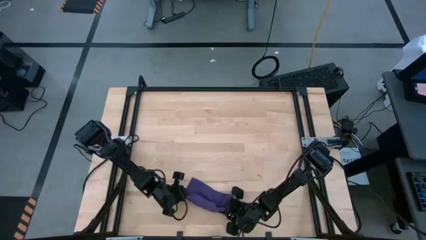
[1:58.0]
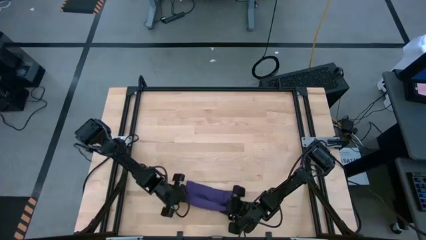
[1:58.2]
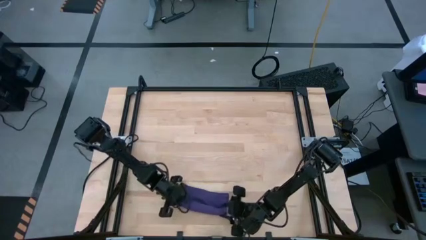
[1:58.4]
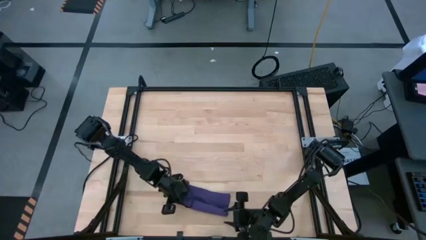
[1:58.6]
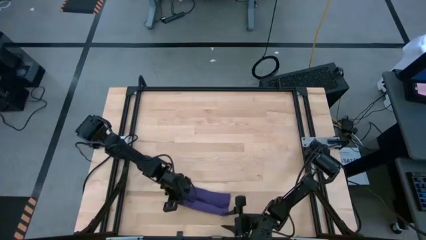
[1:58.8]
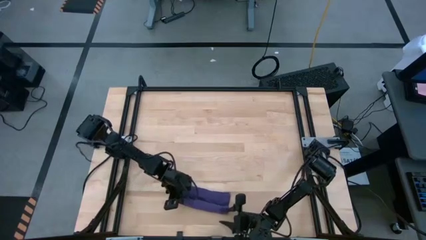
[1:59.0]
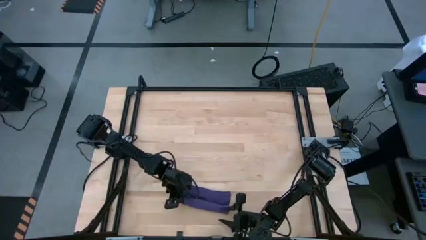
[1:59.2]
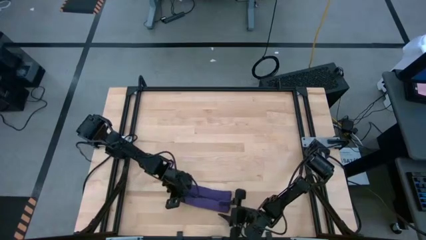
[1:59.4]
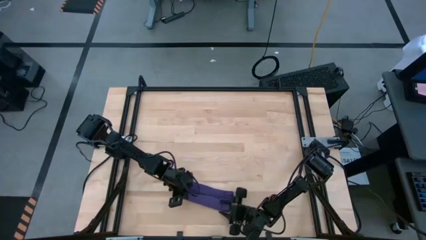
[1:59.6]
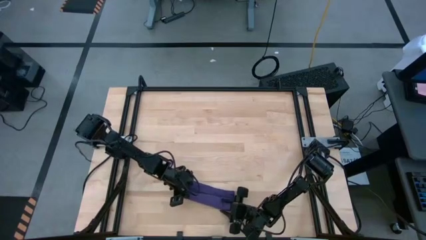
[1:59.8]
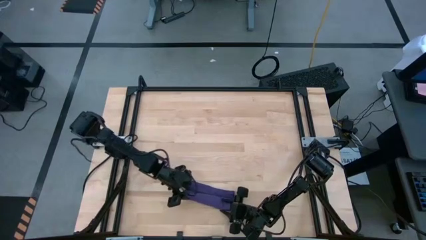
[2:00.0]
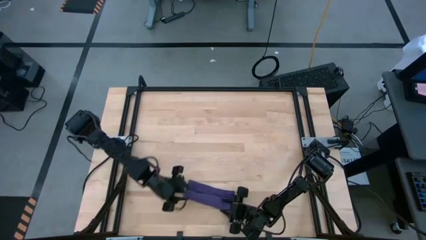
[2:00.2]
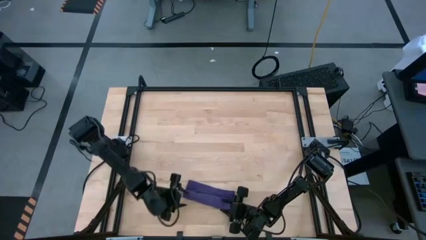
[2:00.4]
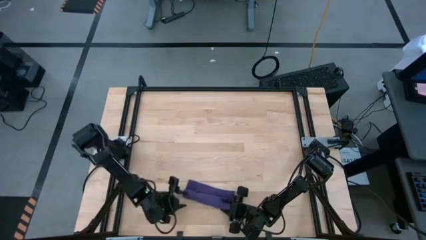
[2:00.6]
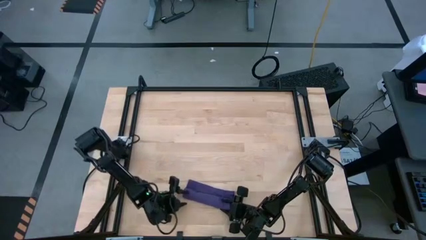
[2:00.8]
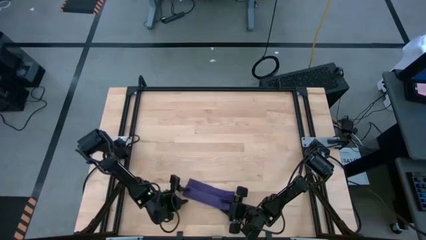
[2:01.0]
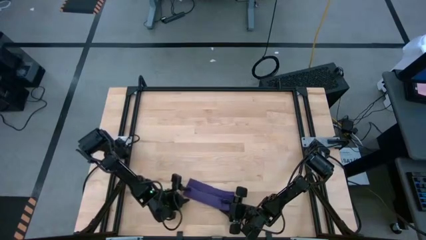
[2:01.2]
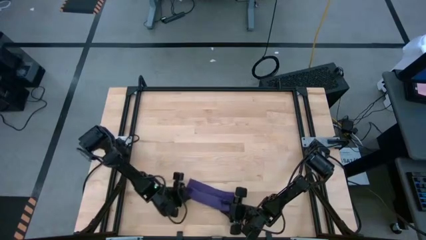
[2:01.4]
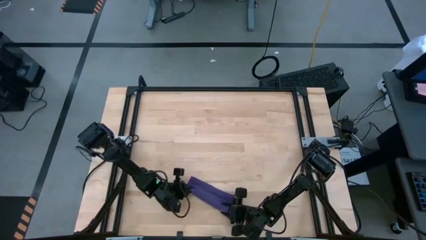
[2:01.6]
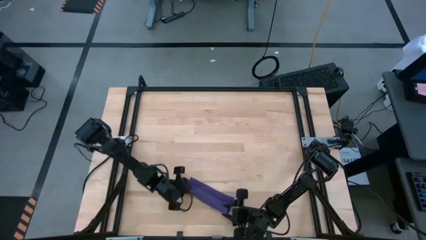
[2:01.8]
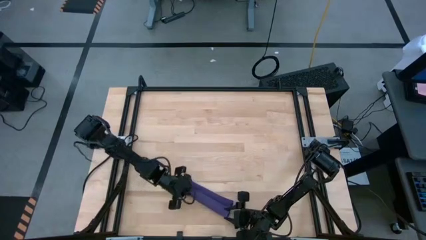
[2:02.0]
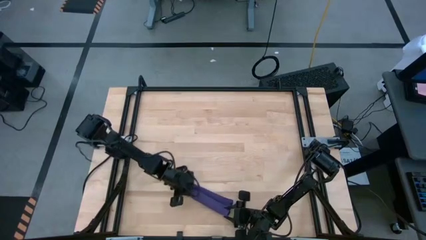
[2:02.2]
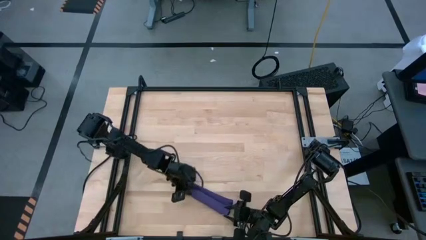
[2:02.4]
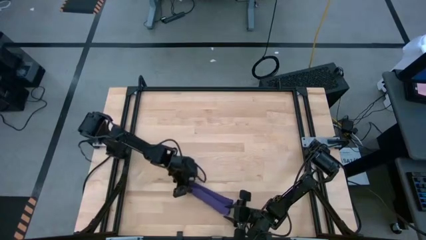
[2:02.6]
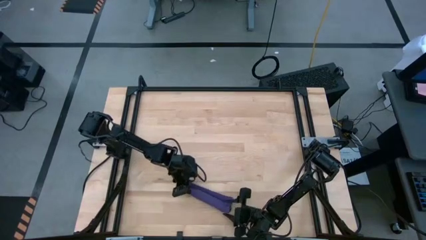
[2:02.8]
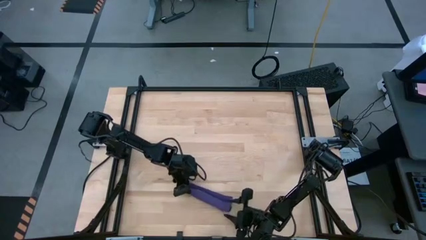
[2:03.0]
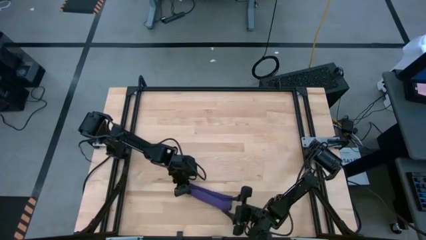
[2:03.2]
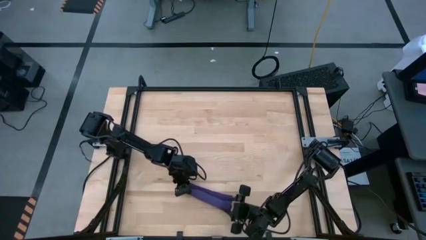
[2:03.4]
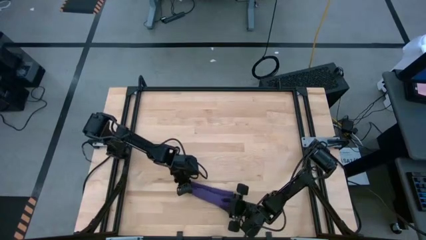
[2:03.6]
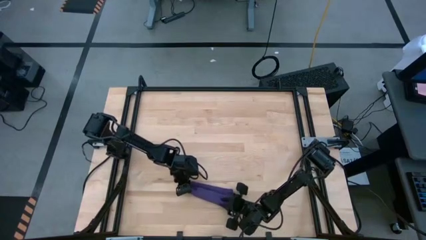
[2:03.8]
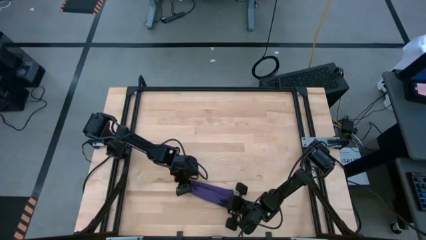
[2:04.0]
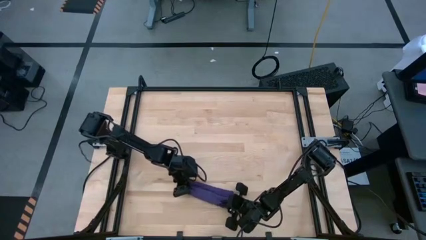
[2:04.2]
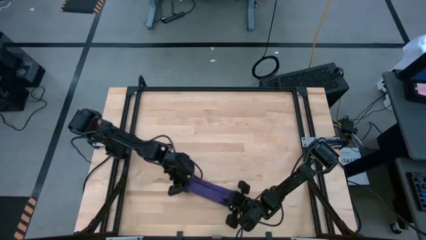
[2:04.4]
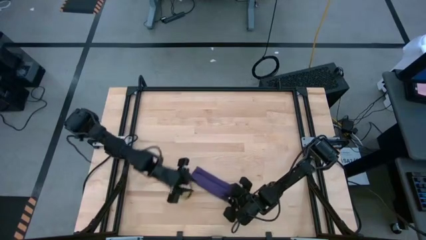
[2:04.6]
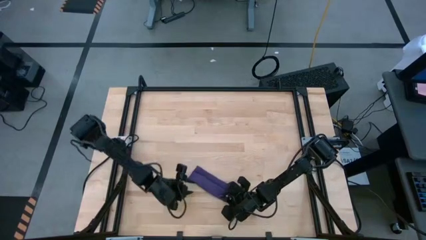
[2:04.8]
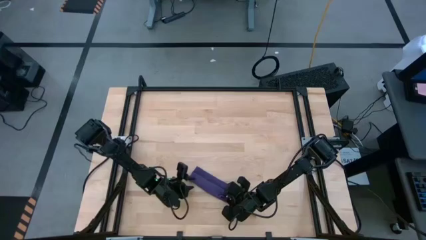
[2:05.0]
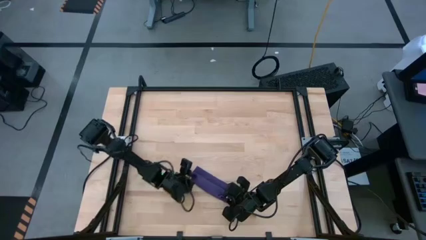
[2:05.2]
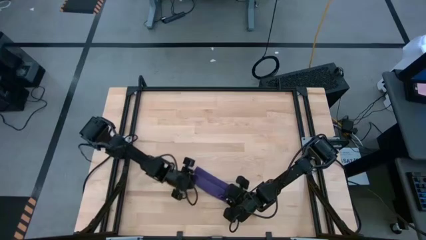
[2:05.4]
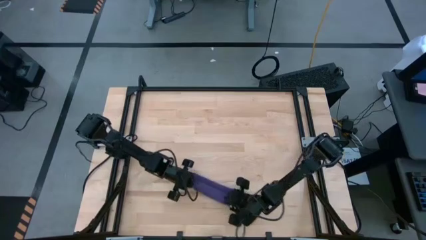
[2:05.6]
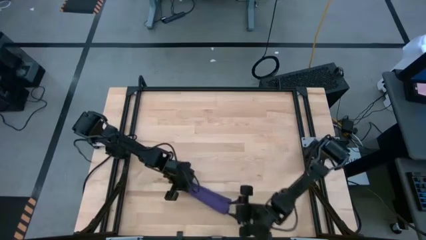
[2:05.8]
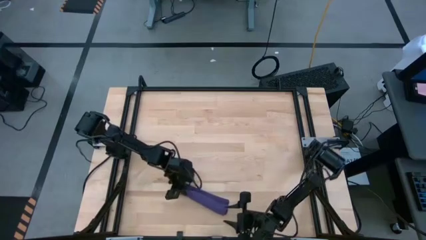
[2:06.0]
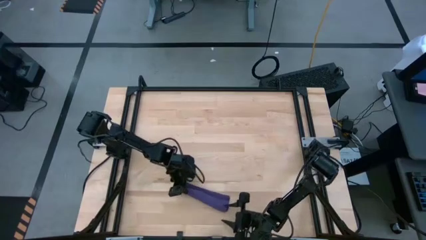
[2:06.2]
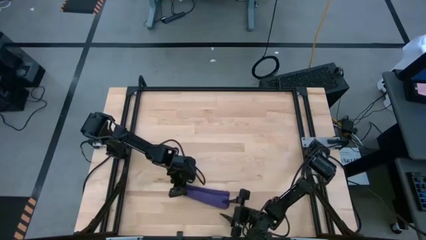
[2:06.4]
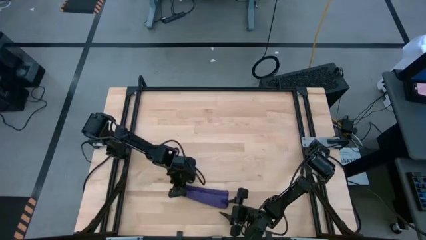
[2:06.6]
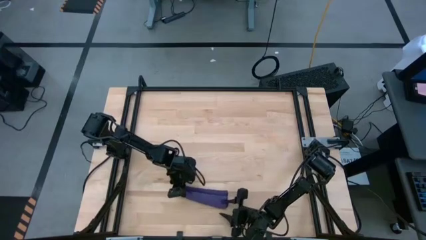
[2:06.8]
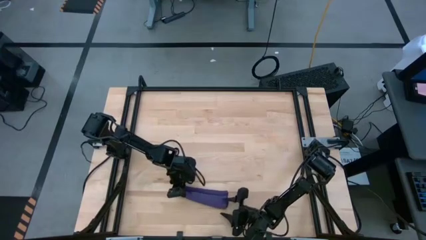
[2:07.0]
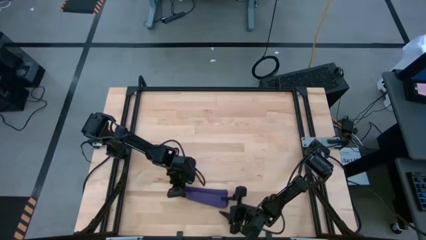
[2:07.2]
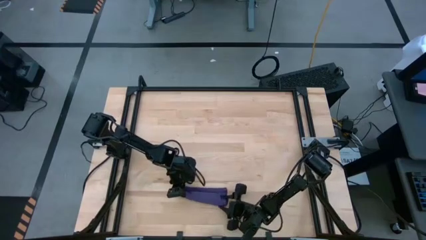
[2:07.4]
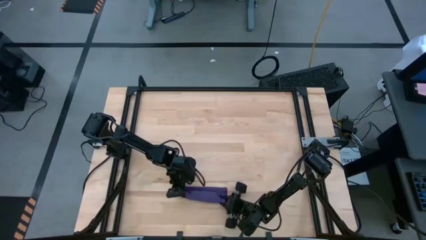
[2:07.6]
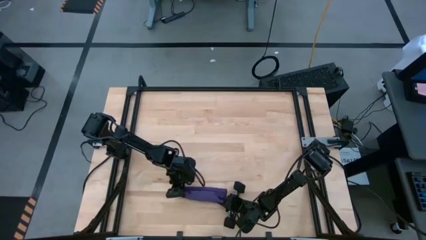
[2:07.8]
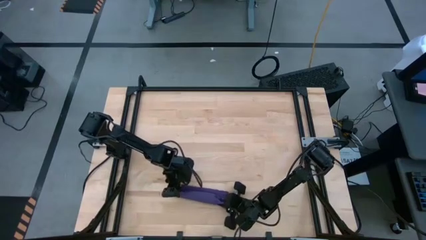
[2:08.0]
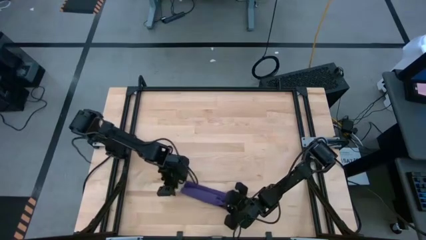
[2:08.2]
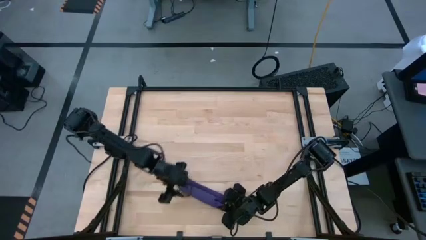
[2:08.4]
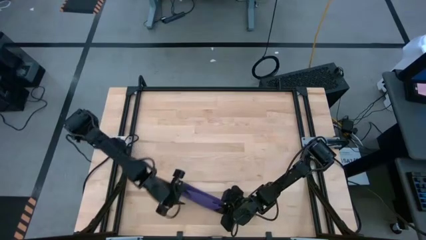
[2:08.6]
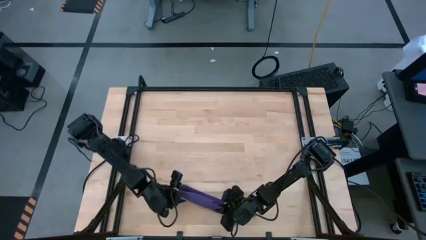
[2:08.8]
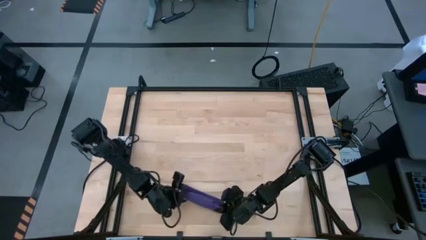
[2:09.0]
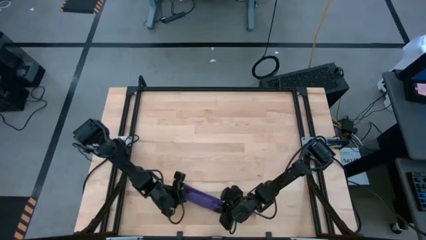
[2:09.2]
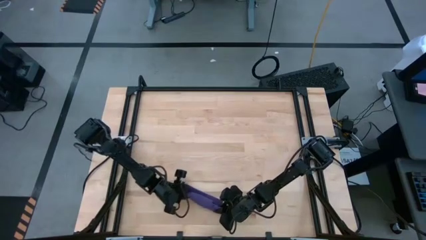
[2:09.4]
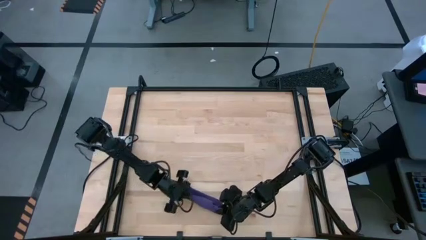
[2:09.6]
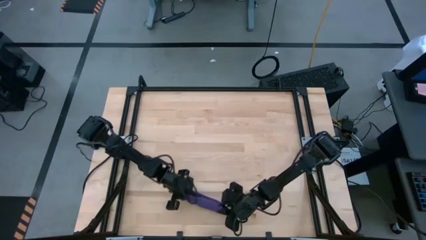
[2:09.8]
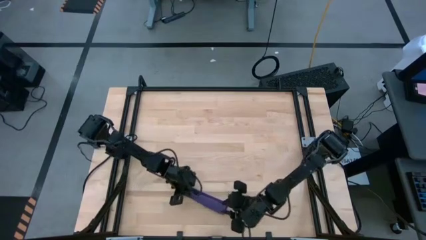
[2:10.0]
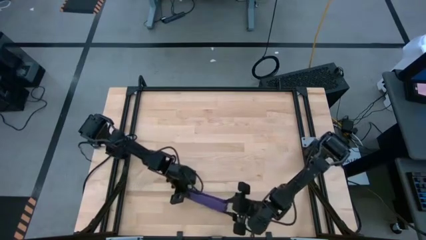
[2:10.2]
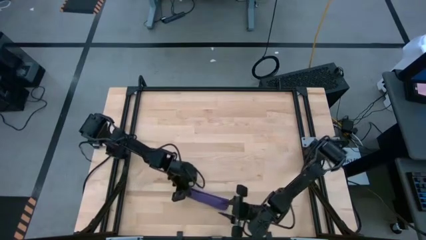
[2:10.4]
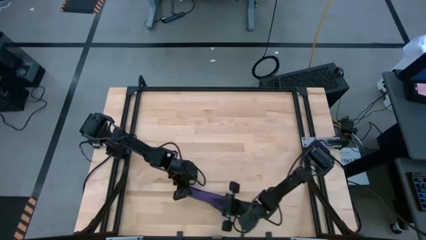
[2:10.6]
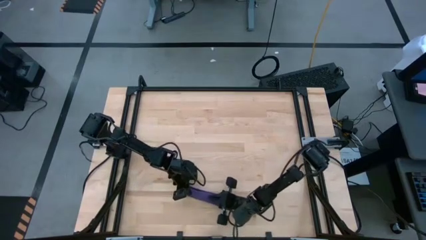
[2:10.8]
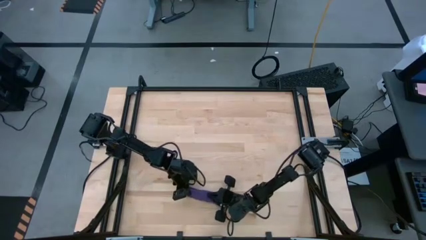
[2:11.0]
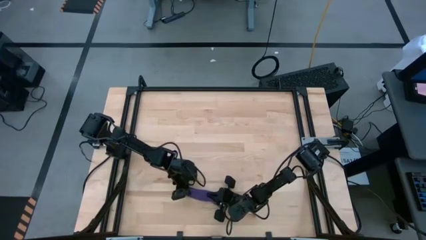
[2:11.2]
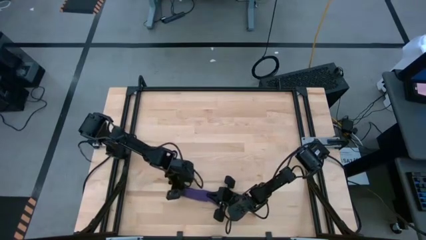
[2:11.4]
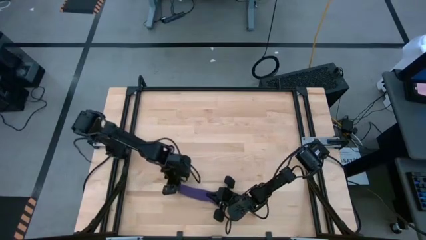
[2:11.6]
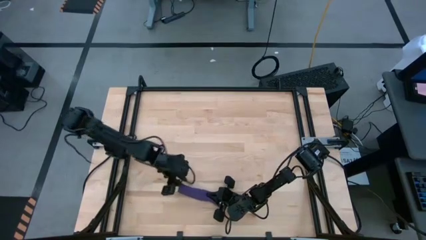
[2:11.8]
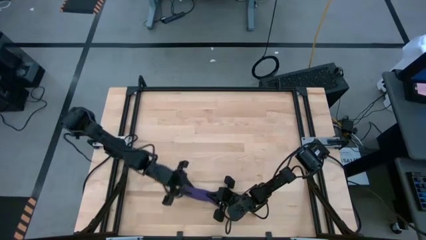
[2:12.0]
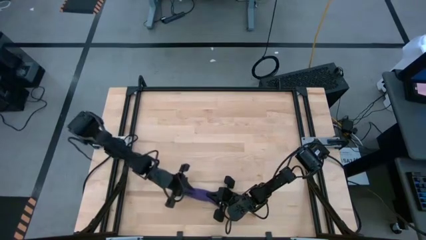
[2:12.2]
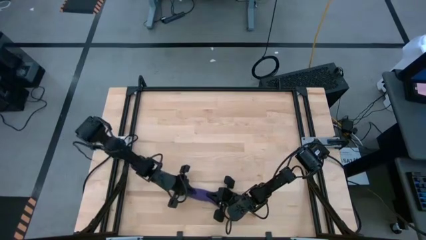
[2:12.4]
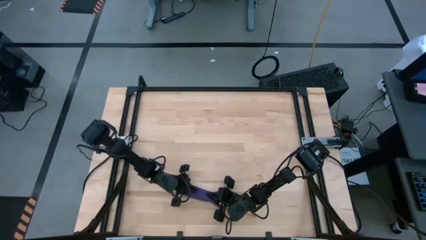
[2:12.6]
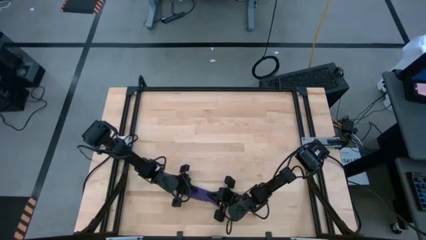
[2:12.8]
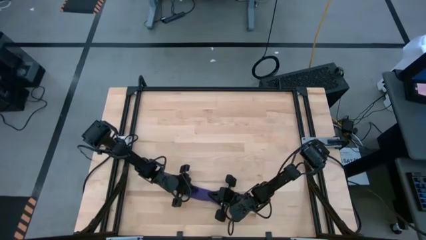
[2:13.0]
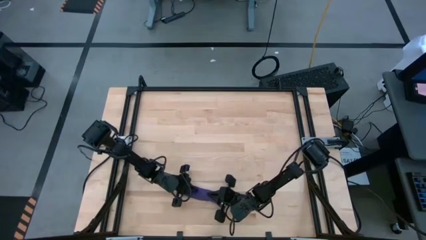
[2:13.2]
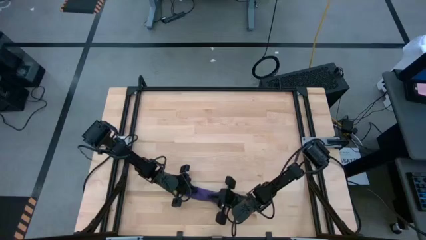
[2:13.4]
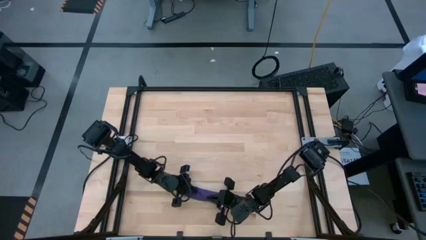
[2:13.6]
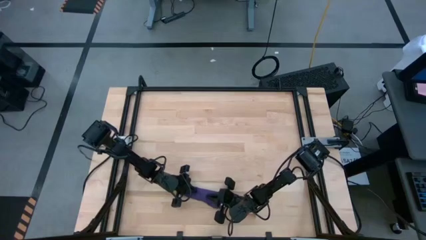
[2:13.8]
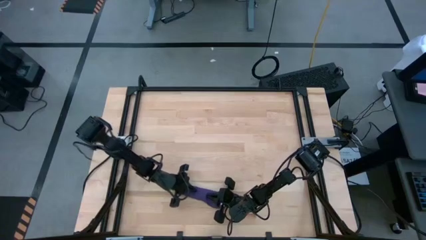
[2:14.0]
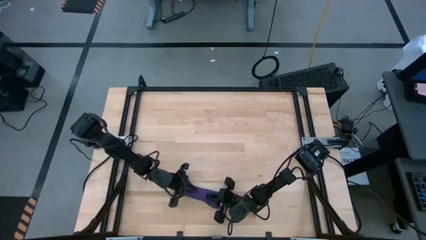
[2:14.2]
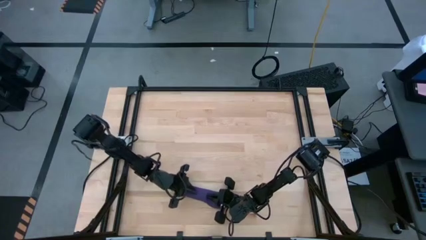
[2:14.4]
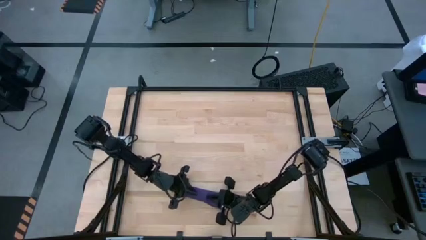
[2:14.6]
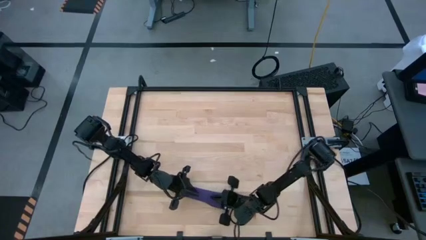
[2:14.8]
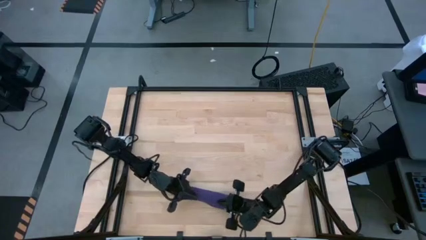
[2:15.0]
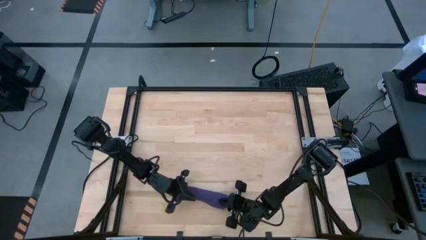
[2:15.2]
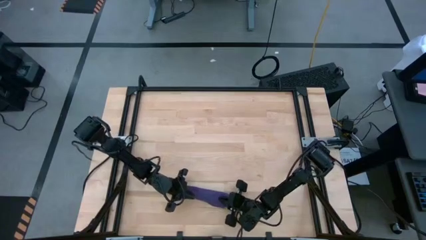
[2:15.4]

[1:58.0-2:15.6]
Task: Roll towel
Roll the purple towel
